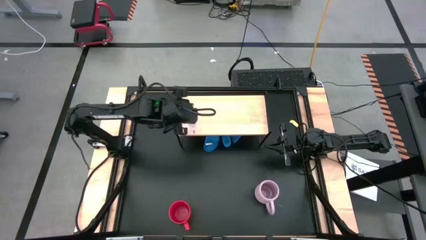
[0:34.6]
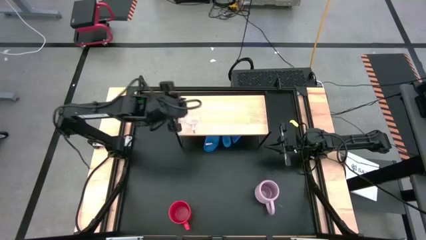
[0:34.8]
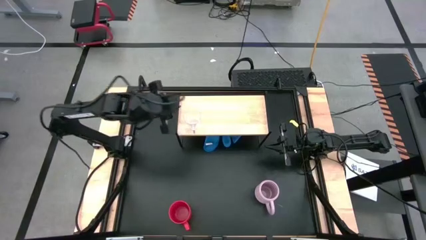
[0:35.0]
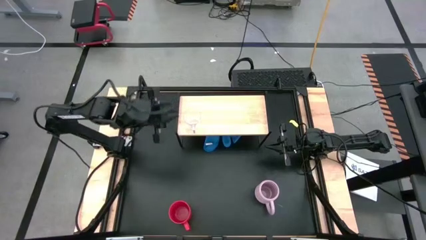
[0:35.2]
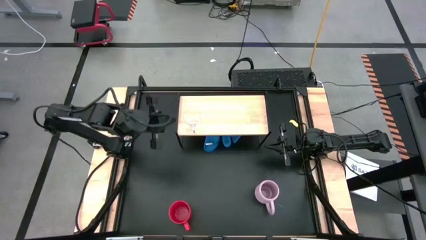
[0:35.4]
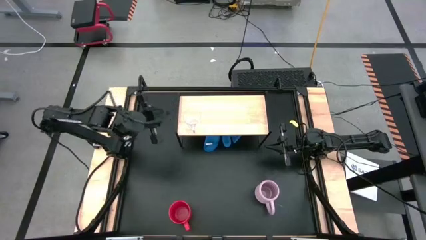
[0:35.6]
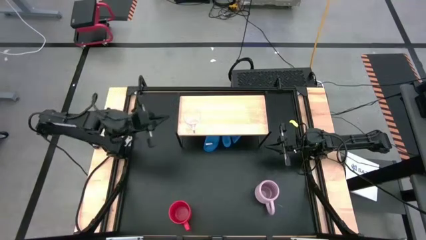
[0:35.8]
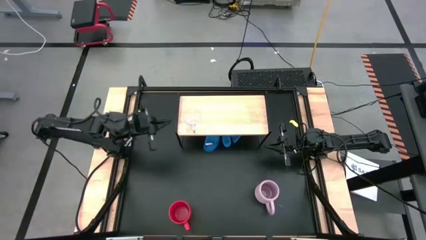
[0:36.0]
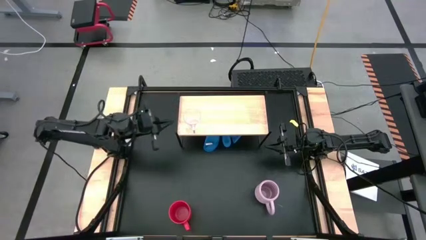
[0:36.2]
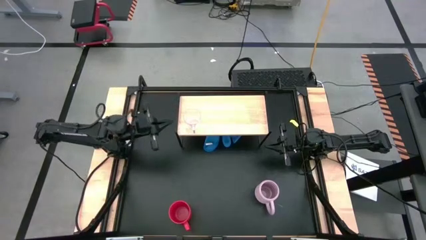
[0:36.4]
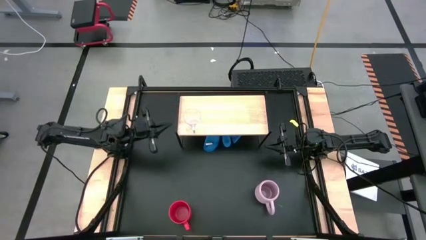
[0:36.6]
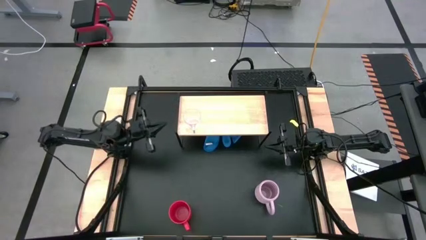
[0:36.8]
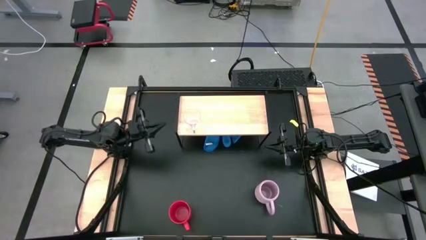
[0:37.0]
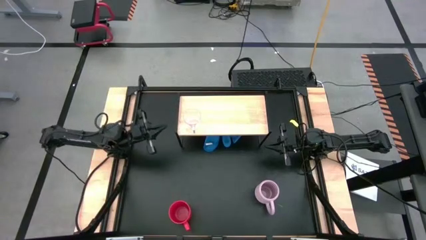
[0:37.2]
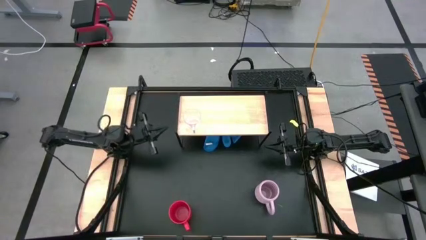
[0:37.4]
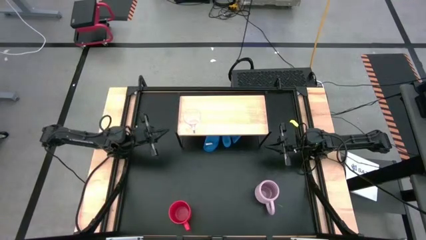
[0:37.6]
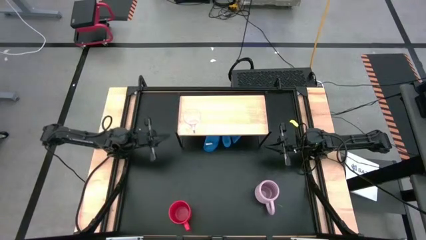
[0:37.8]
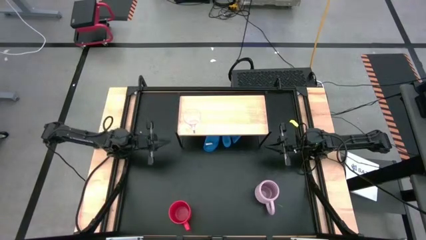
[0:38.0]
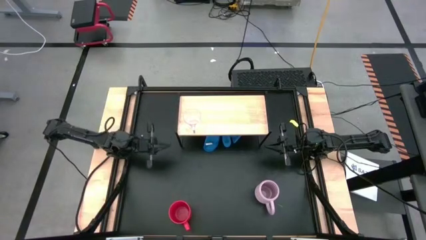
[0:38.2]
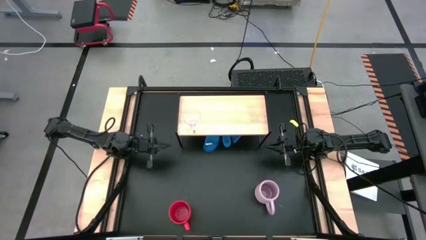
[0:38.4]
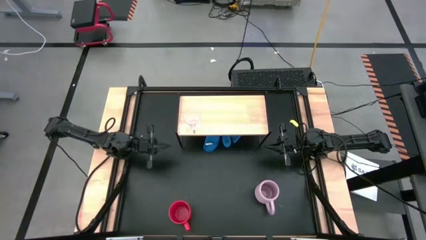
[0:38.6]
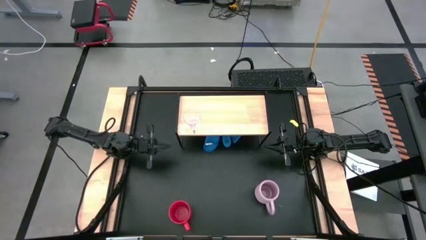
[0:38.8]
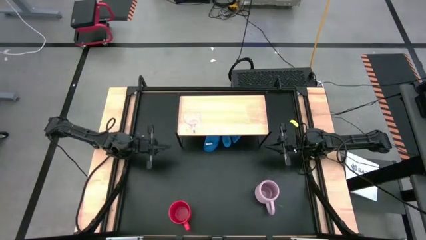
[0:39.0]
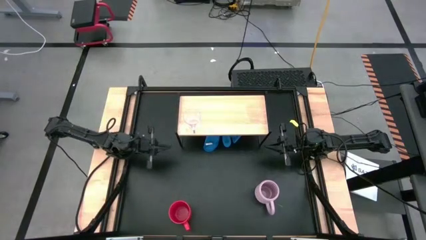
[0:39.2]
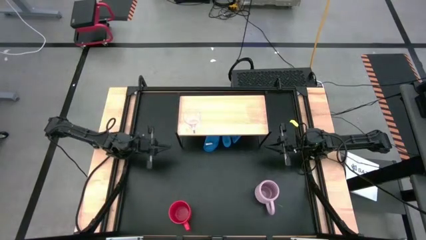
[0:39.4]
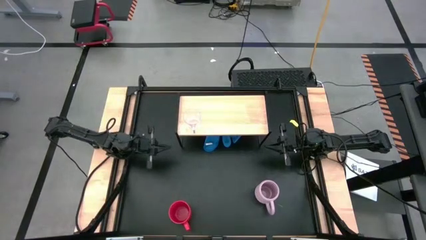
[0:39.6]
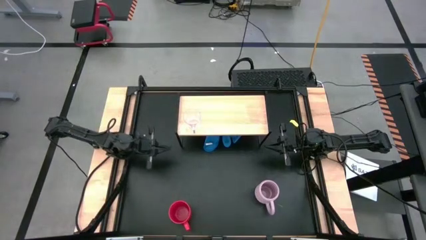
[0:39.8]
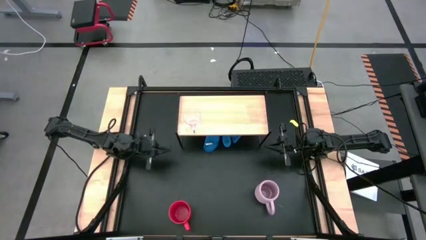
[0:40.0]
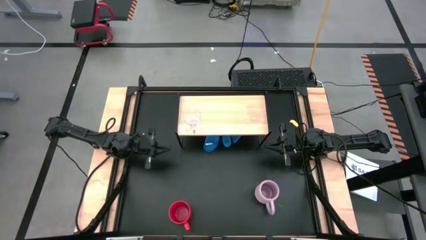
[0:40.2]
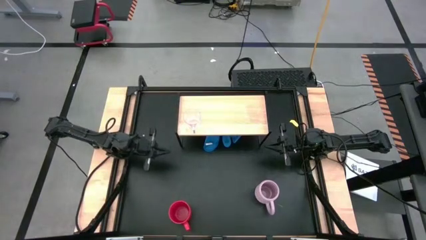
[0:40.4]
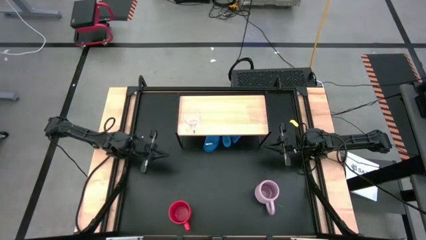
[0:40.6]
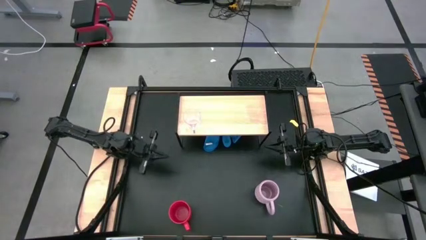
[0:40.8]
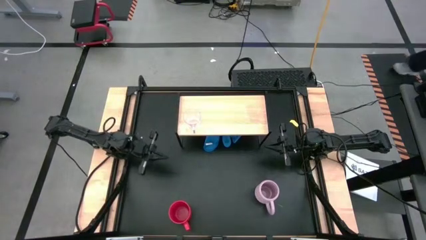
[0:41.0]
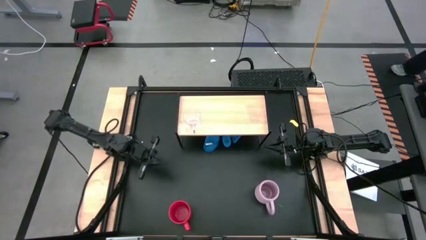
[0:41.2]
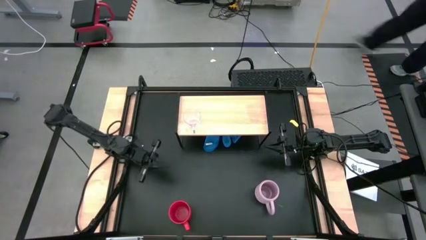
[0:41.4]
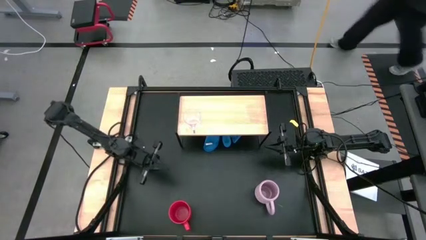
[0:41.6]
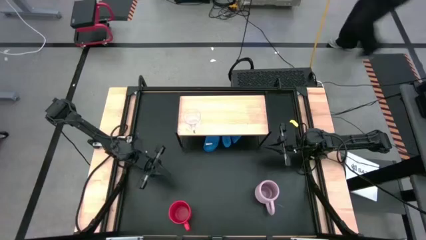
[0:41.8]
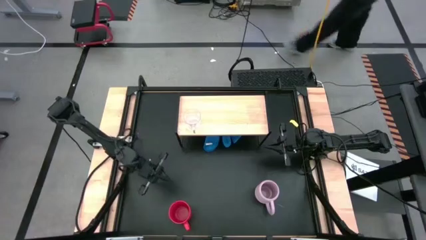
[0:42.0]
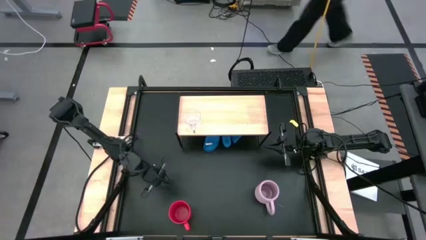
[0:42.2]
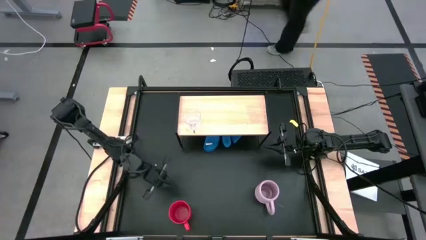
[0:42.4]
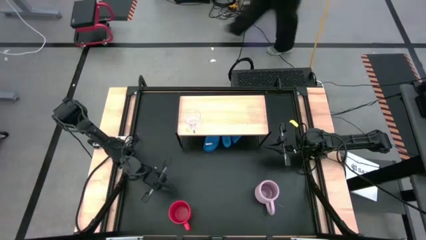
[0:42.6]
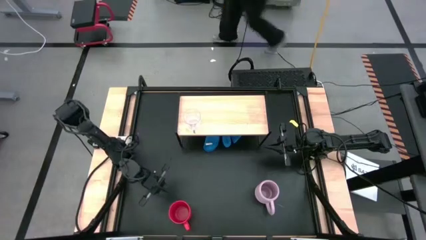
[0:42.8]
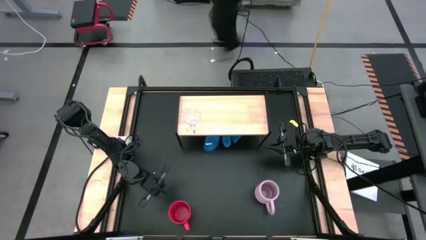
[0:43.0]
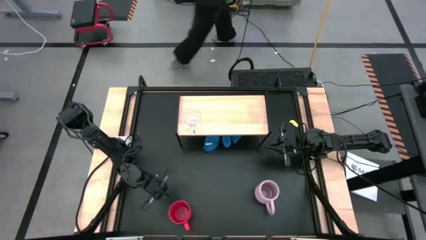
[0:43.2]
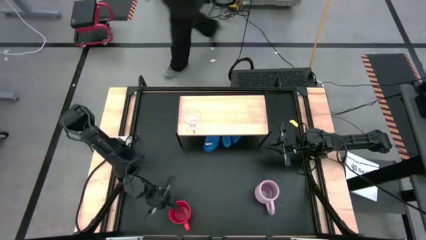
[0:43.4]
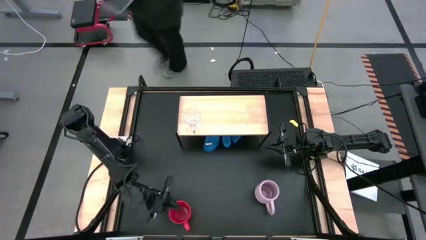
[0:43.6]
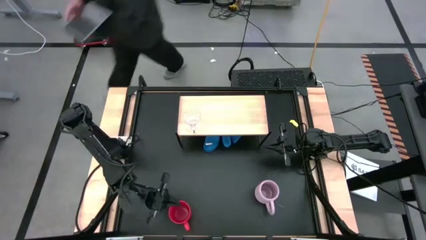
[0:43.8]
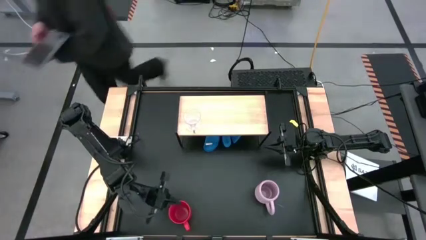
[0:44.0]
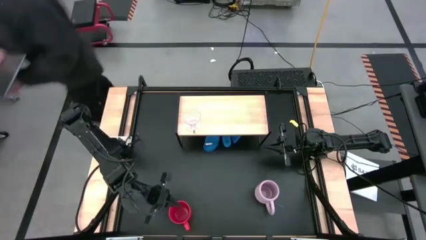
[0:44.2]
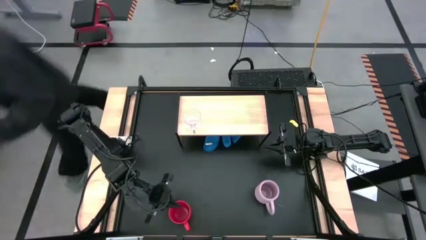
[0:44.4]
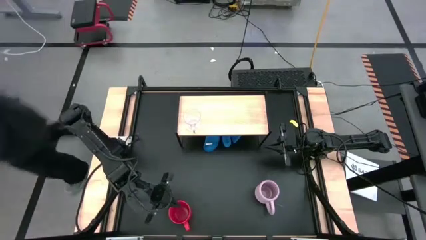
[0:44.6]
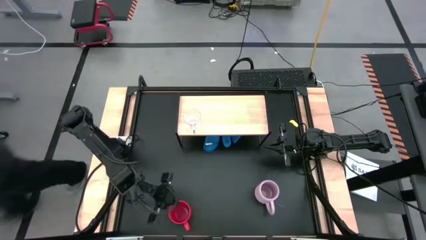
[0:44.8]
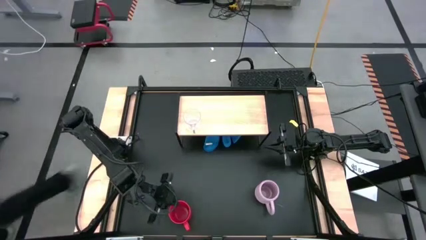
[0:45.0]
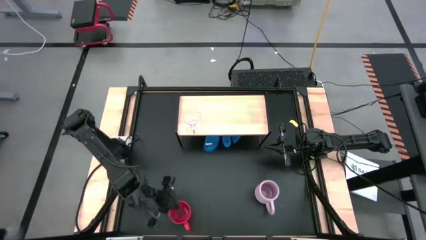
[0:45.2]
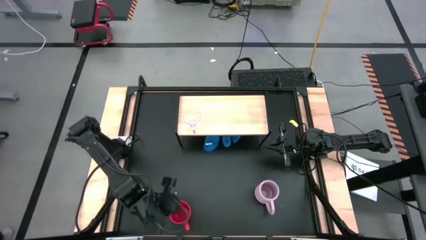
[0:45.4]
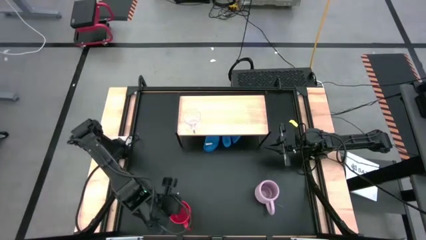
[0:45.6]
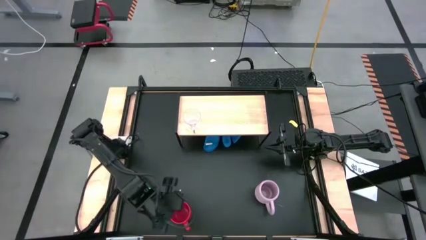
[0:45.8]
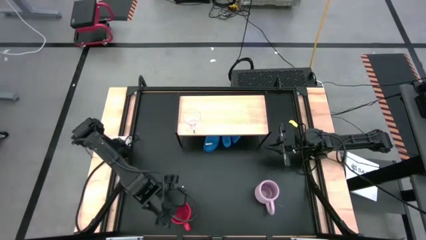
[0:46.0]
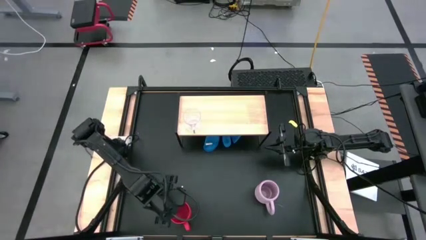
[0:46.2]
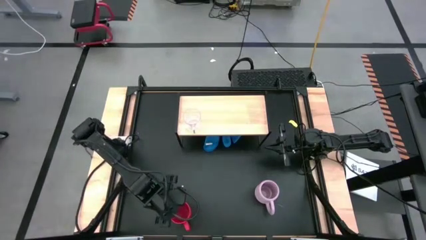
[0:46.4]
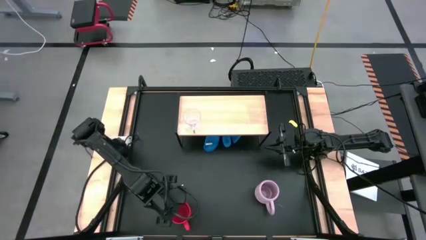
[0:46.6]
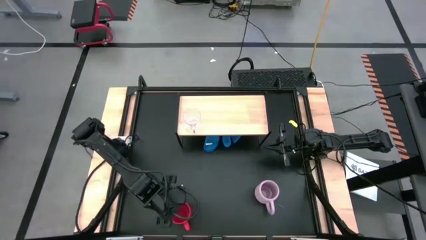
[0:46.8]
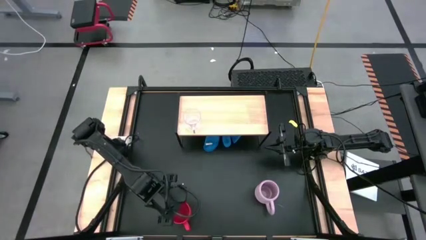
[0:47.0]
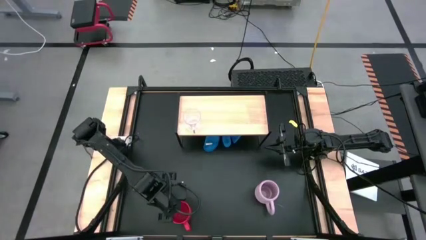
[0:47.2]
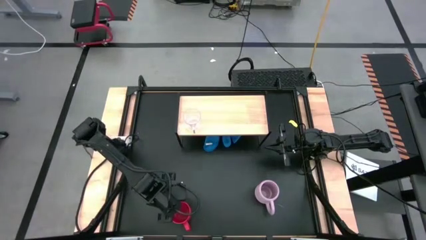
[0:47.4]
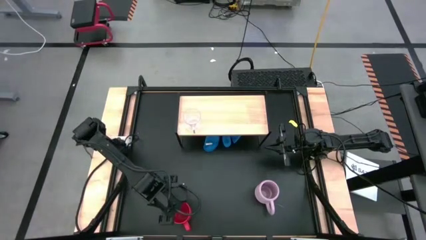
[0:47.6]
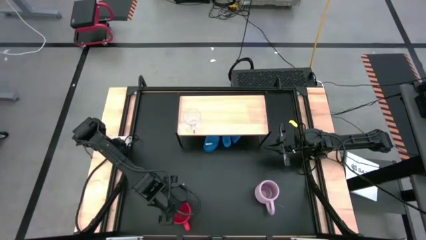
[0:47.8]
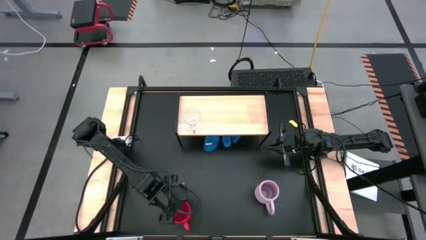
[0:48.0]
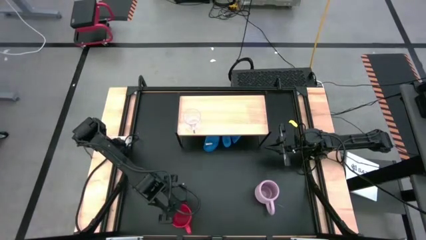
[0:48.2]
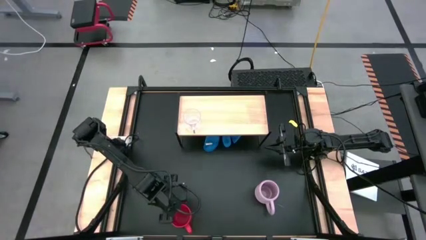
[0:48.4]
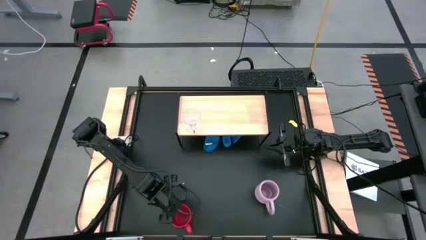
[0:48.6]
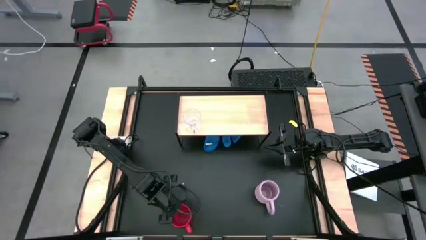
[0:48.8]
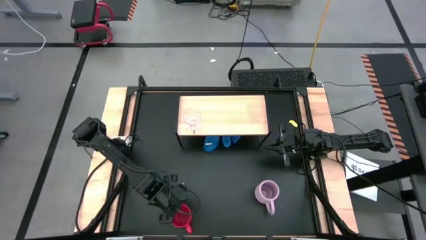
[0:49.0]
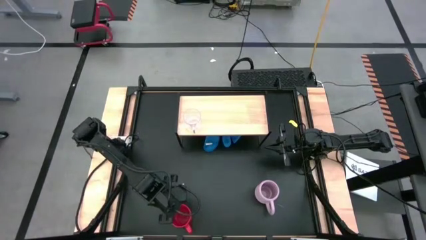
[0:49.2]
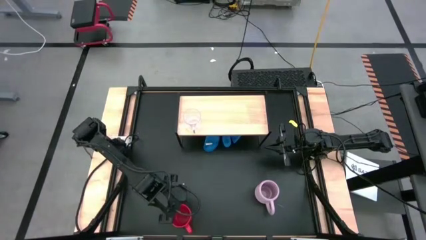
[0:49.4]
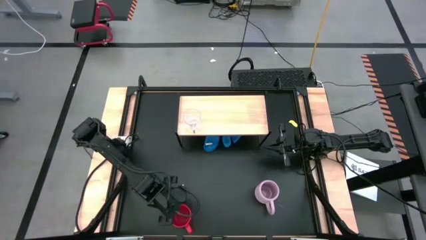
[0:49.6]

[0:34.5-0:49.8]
Task: Stack small to large cups/mugs on shelf
Put the red mug on the shelf
